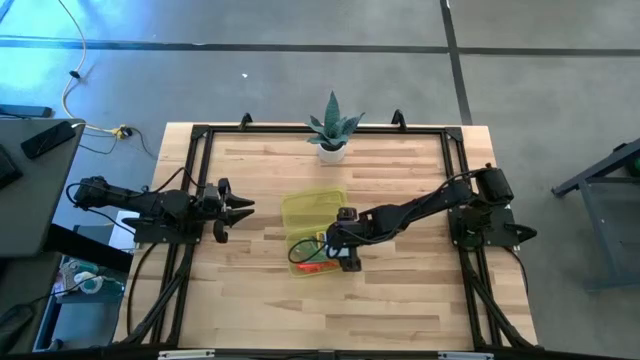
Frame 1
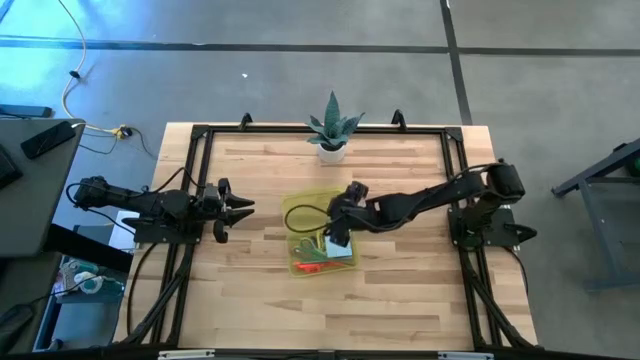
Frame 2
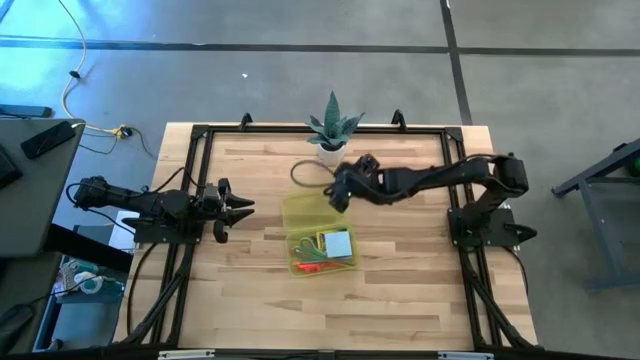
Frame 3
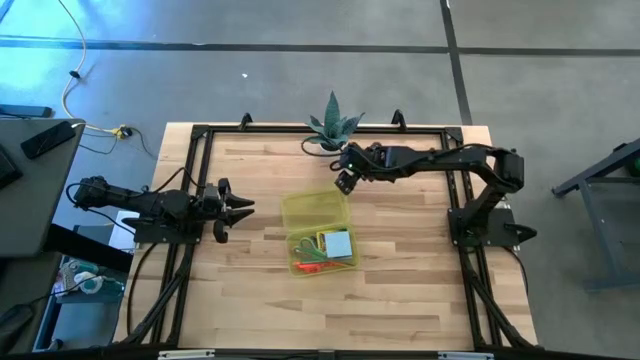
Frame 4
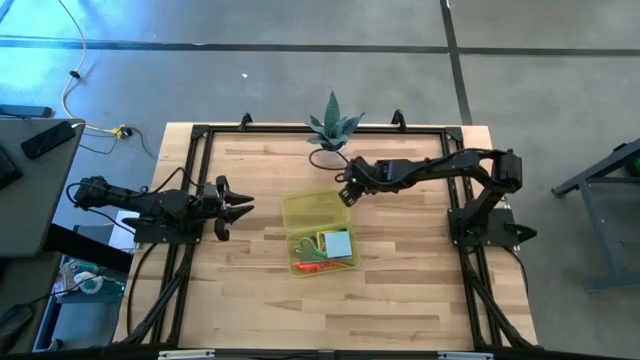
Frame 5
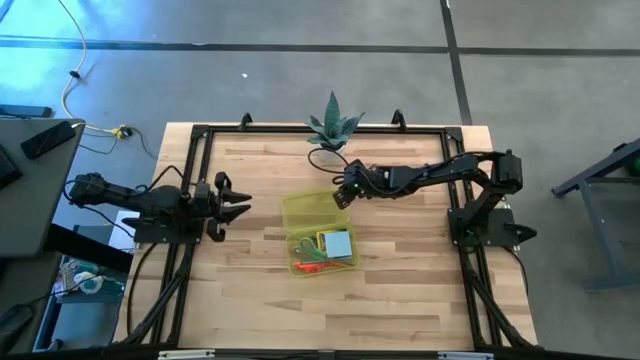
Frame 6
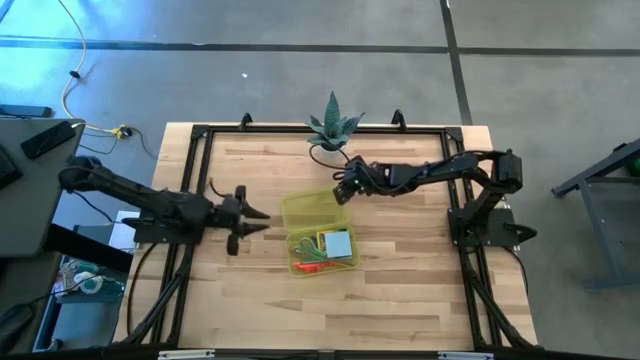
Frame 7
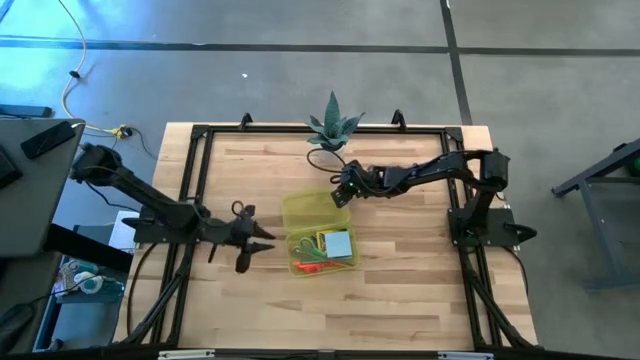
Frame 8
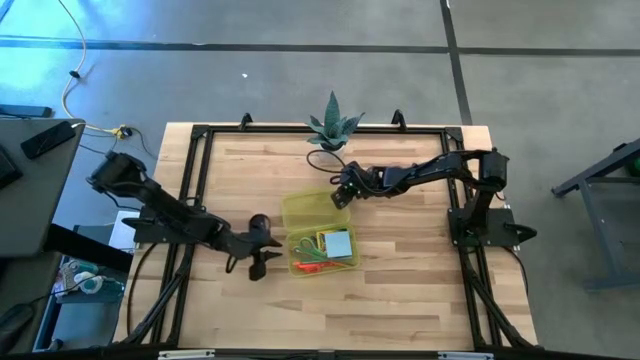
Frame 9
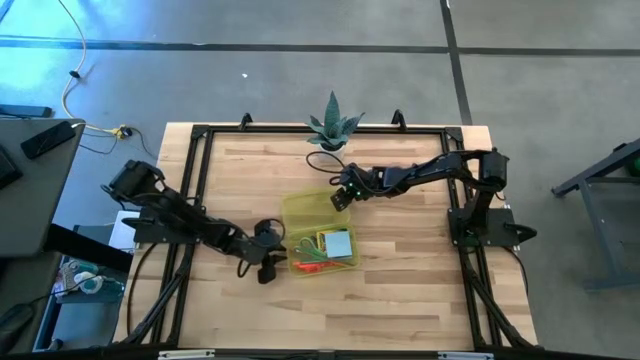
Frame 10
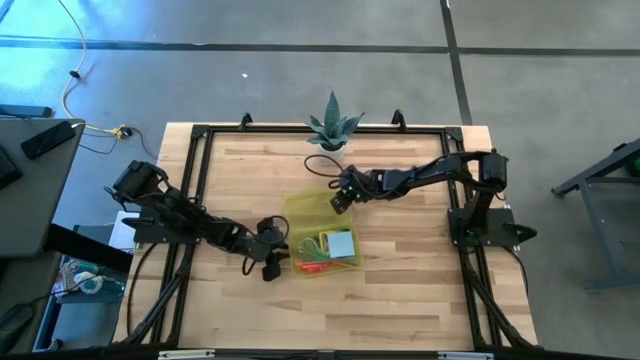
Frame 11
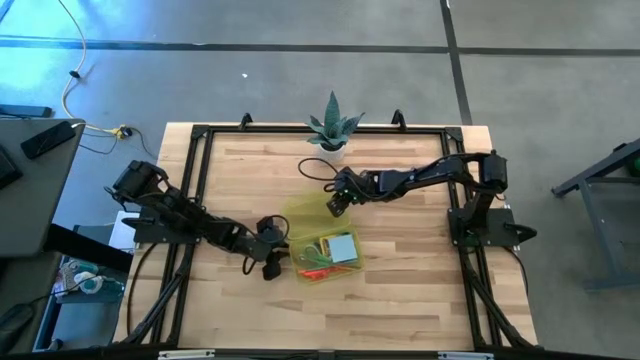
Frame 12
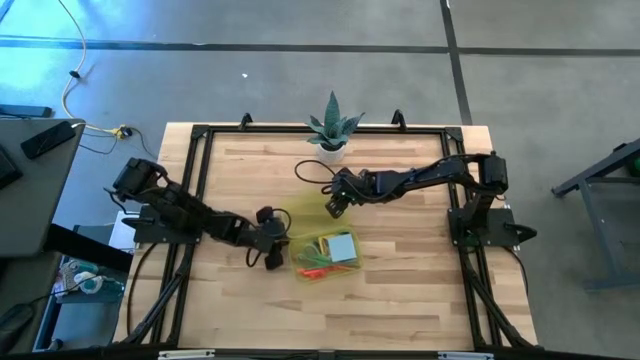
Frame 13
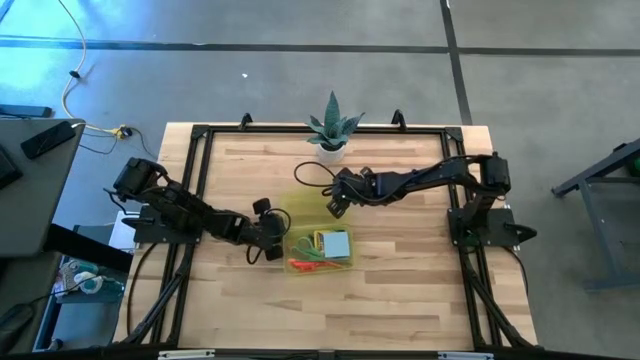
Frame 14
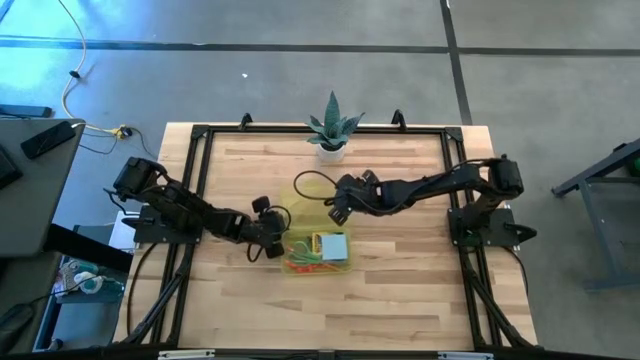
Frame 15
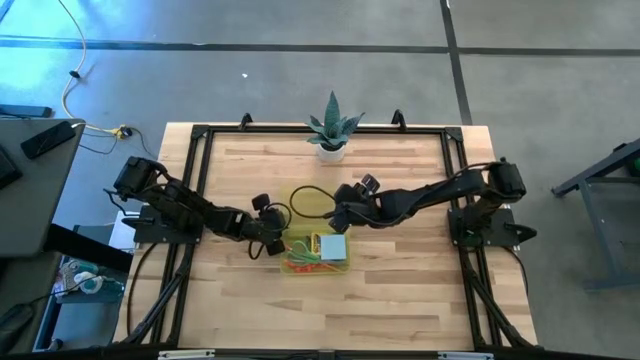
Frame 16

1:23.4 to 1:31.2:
Task: Pack school essentials
Close the yellow school supply box

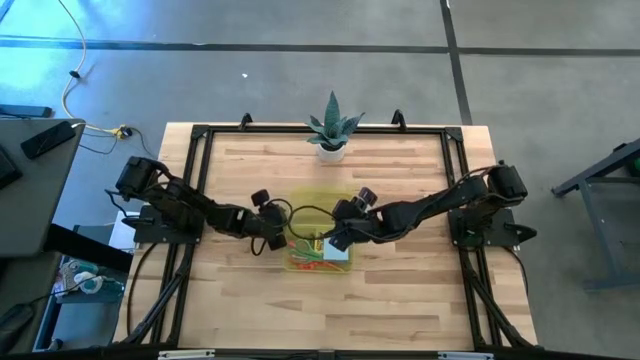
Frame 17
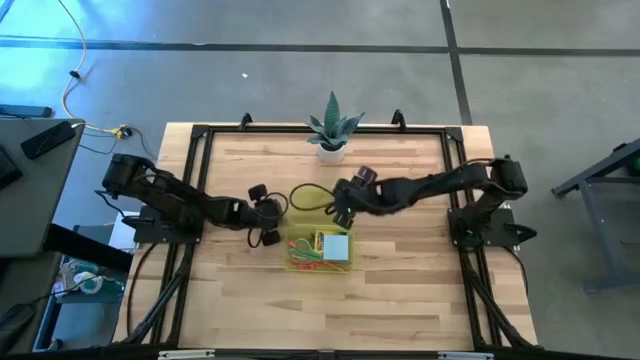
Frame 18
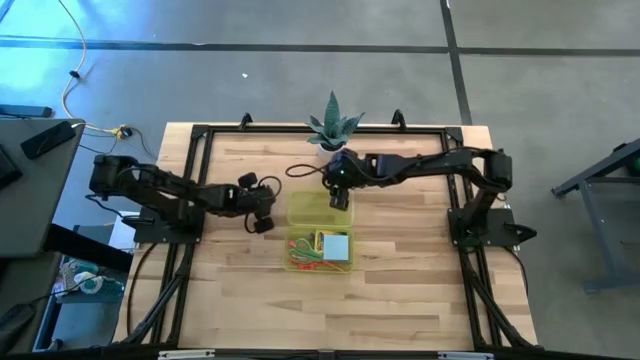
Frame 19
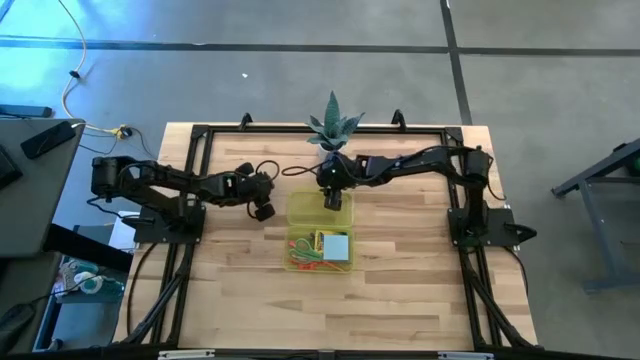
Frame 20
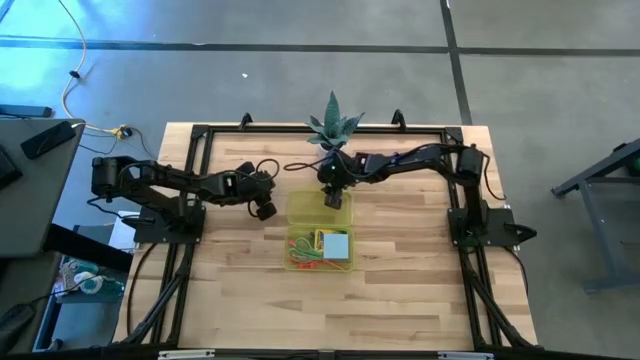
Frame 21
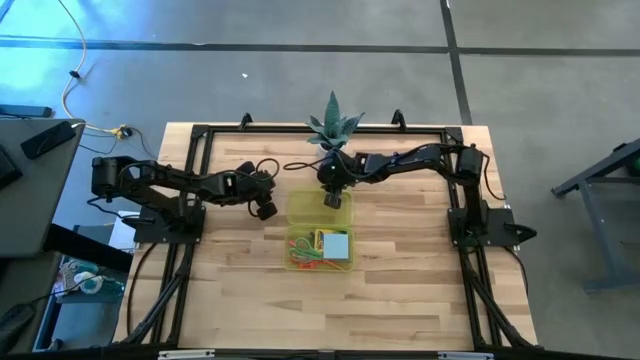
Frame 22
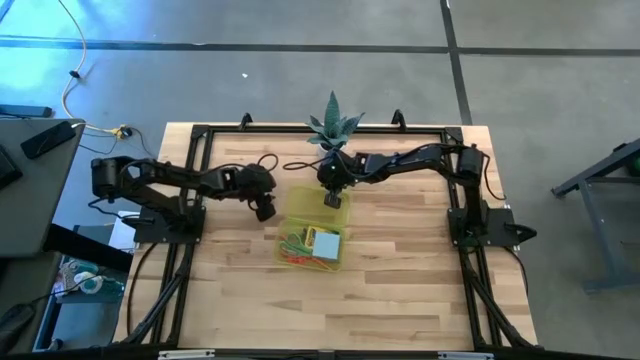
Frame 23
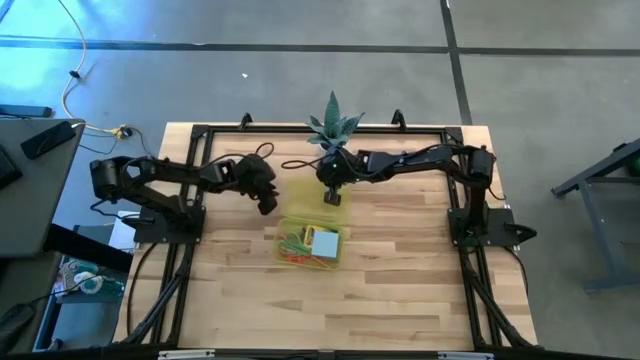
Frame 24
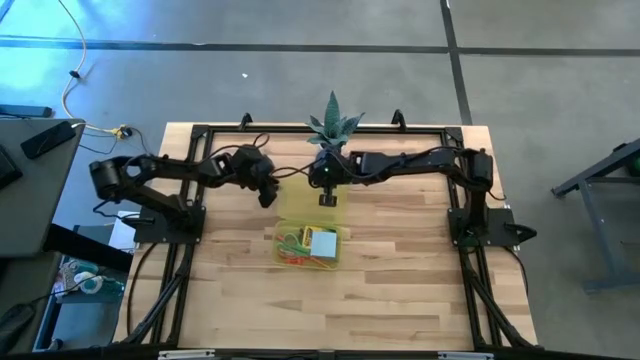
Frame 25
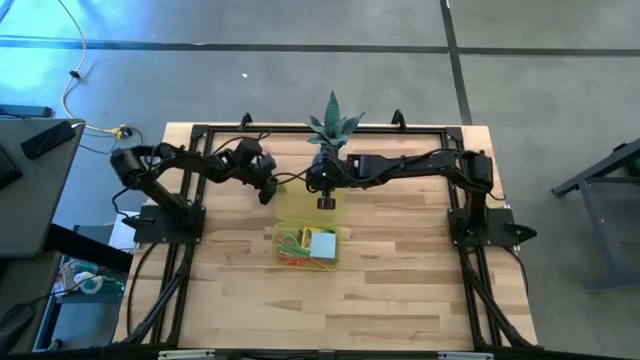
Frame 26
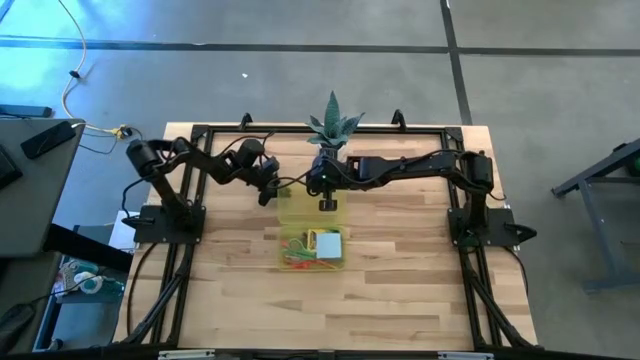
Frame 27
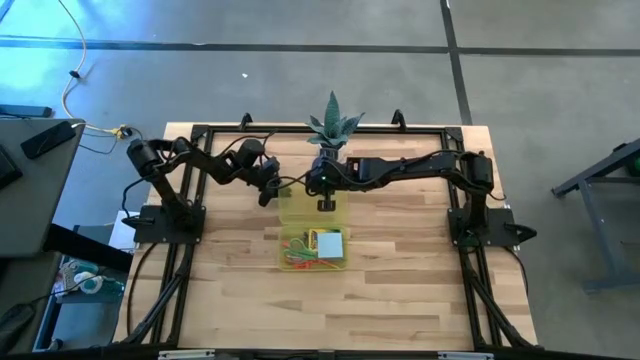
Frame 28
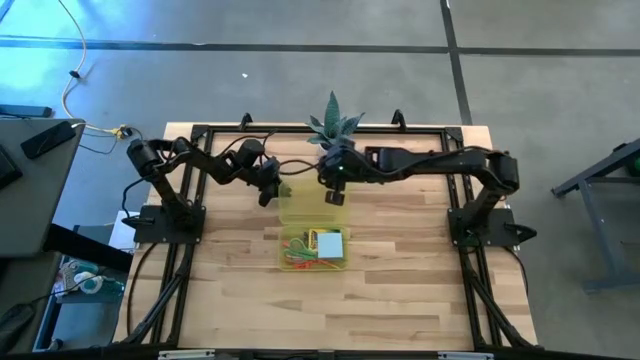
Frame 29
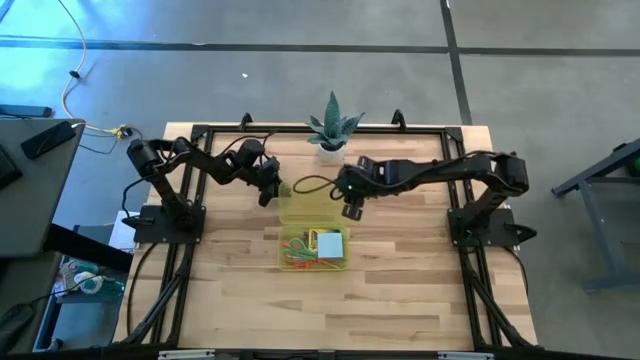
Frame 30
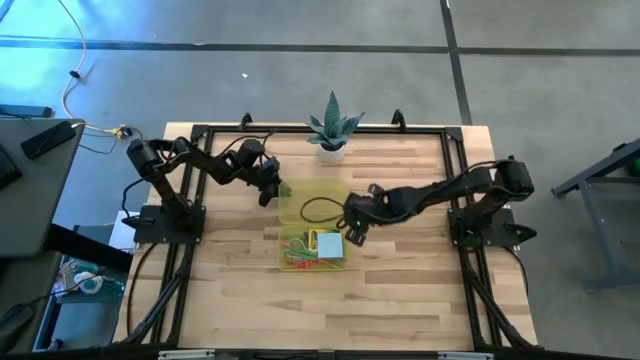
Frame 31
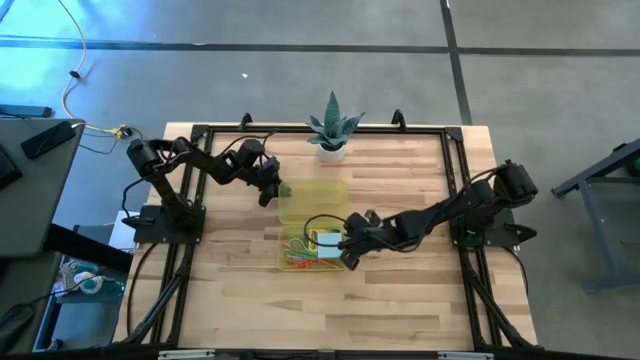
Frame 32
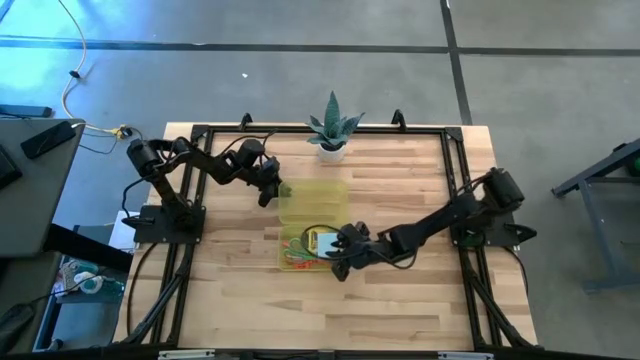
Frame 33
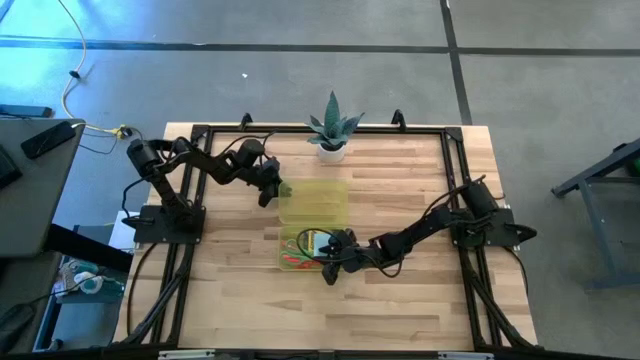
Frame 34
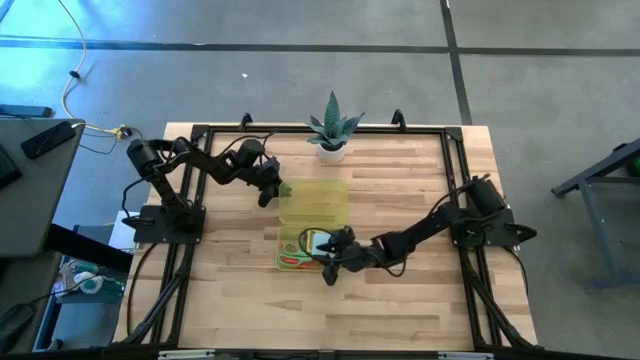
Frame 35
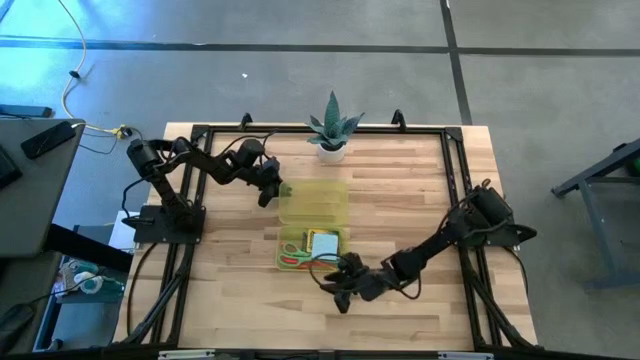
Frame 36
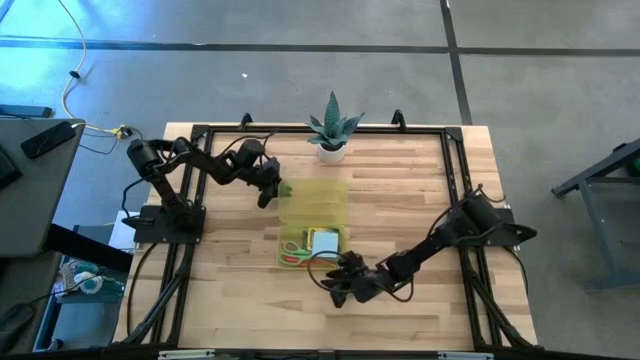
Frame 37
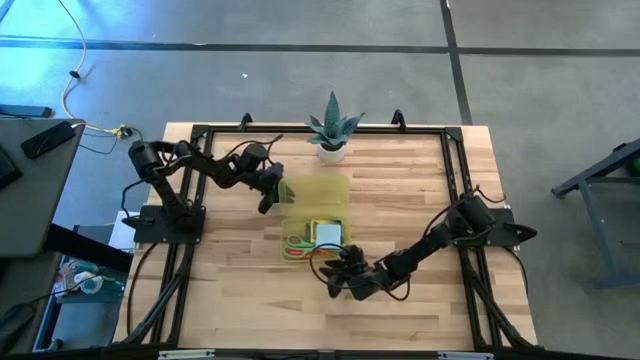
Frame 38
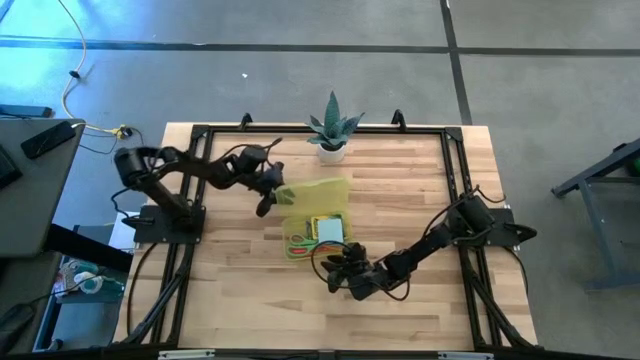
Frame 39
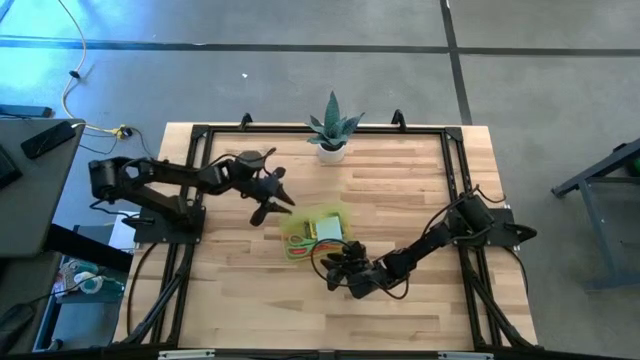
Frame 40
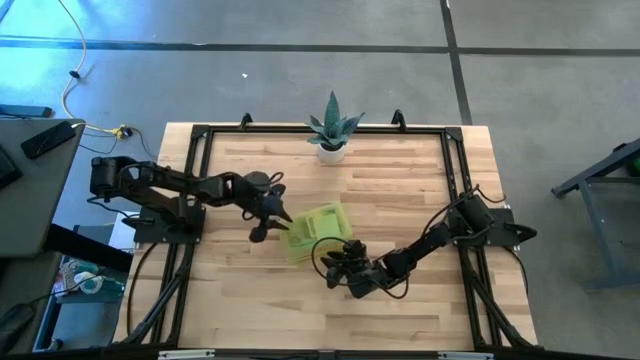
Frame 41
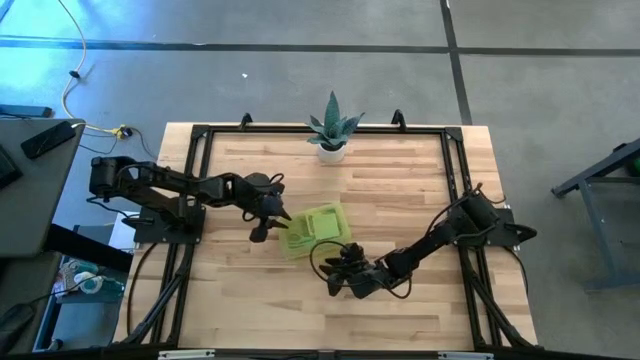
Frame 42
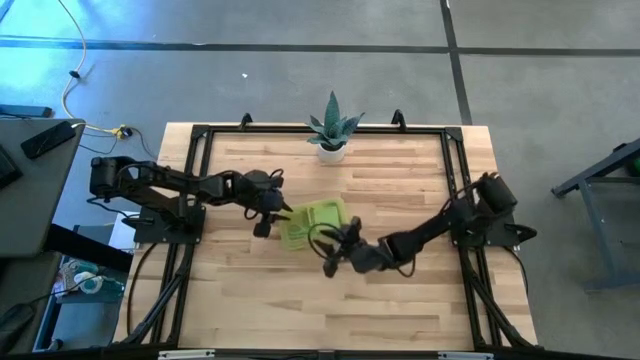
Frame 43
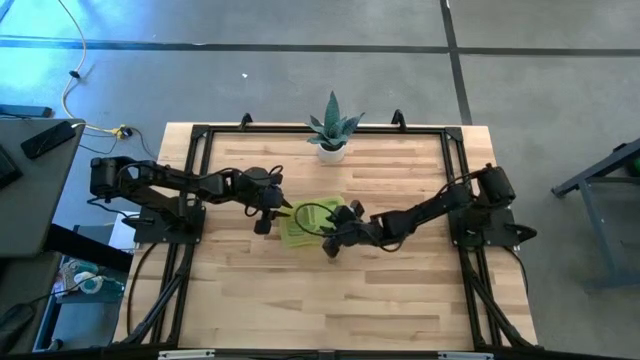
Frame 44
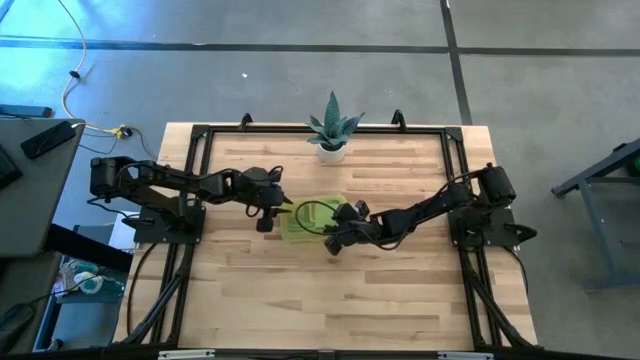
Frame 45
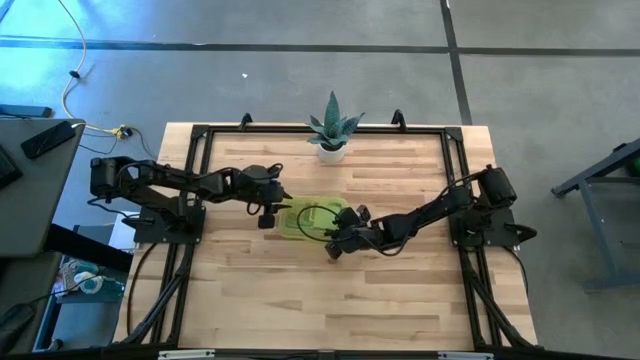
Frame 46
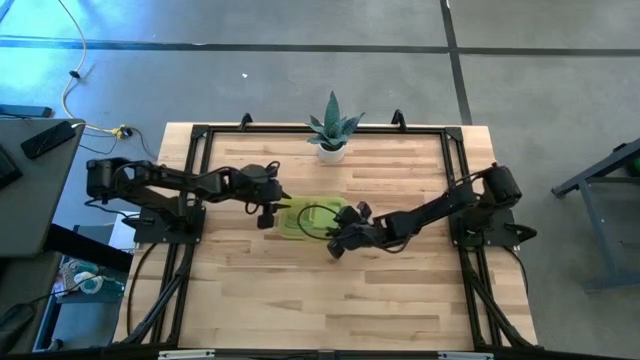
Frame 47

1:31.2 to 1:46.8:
Close the yellow school supply box
